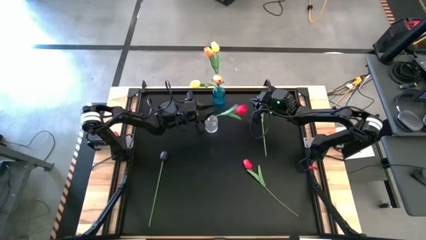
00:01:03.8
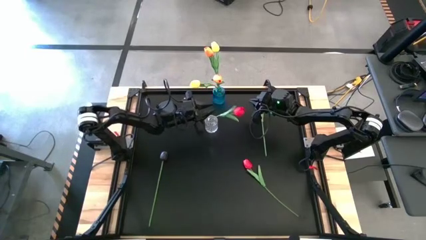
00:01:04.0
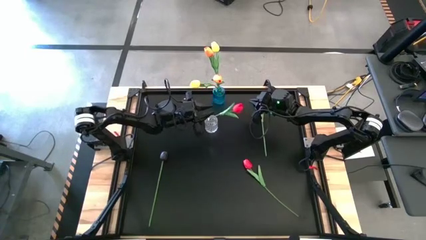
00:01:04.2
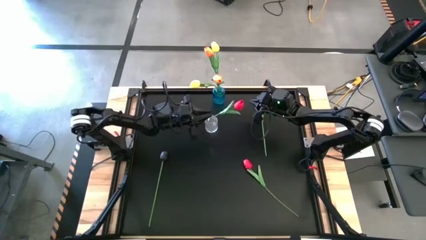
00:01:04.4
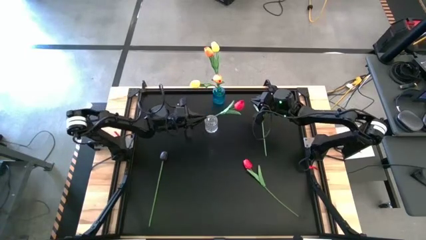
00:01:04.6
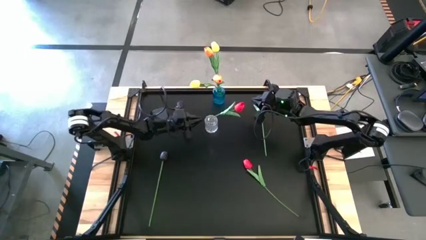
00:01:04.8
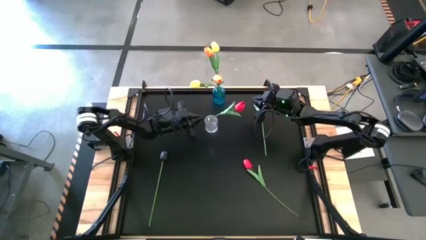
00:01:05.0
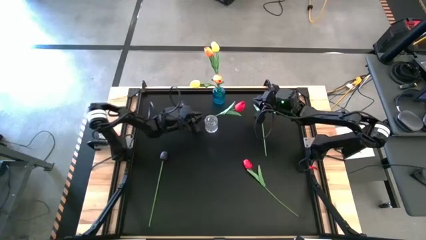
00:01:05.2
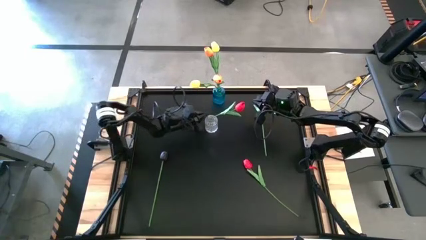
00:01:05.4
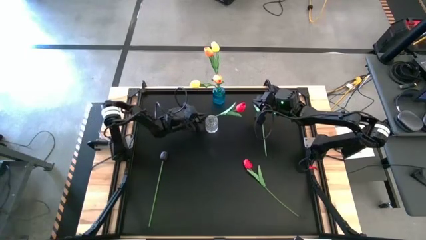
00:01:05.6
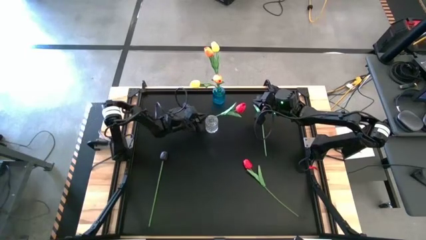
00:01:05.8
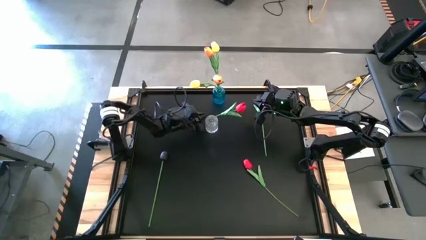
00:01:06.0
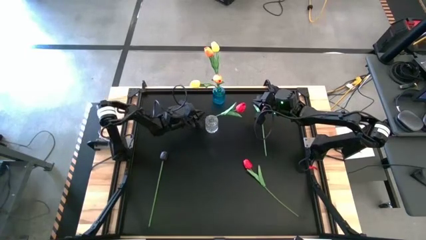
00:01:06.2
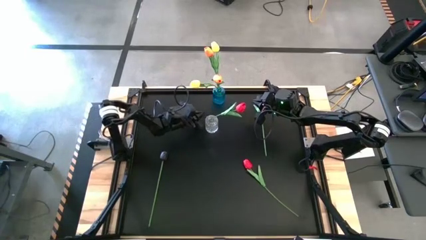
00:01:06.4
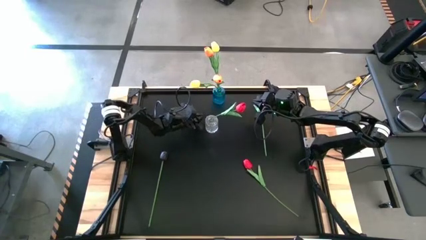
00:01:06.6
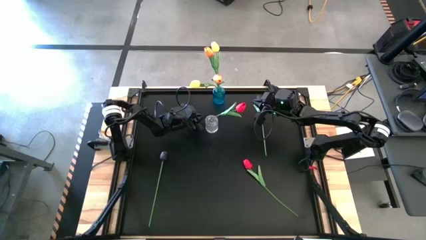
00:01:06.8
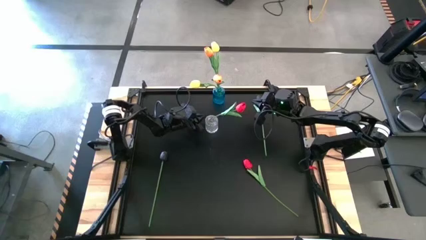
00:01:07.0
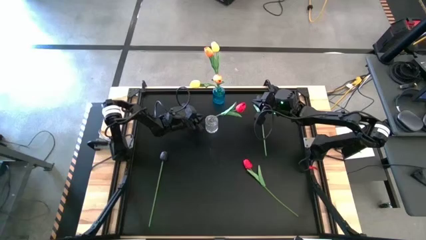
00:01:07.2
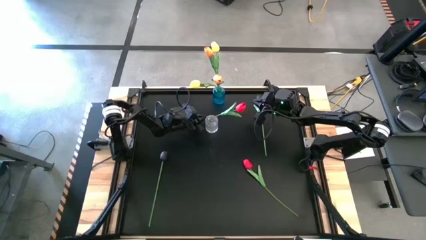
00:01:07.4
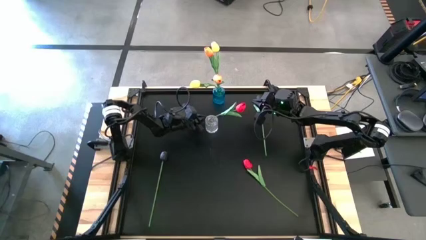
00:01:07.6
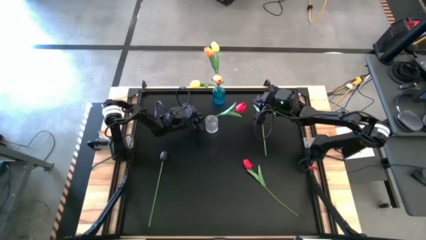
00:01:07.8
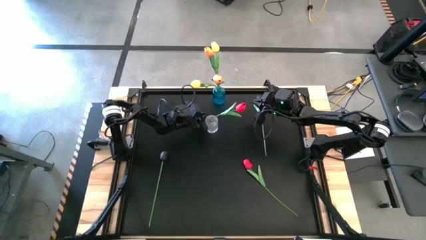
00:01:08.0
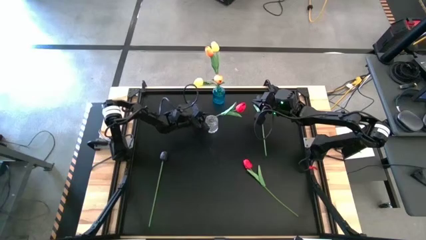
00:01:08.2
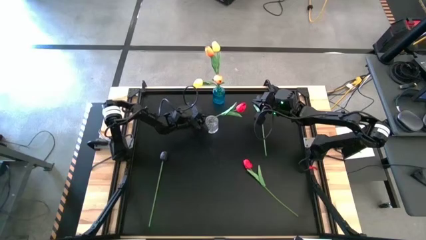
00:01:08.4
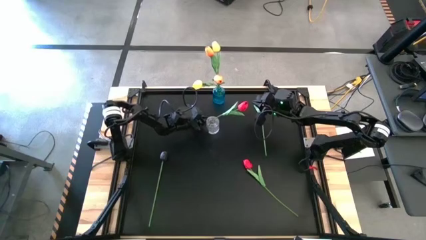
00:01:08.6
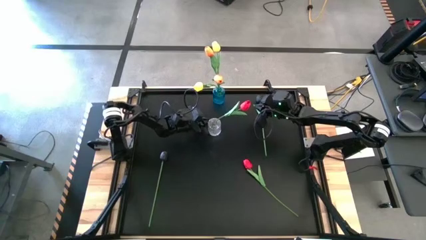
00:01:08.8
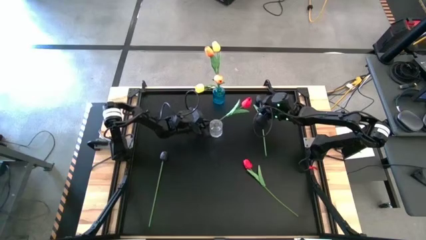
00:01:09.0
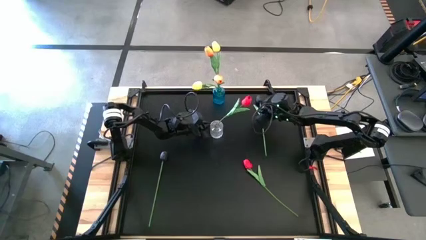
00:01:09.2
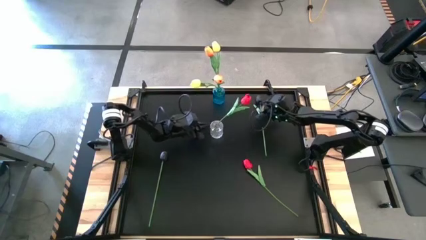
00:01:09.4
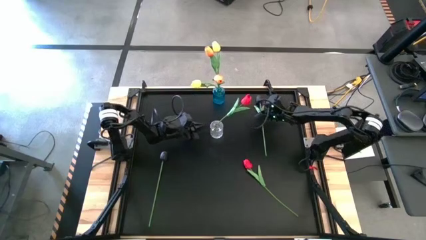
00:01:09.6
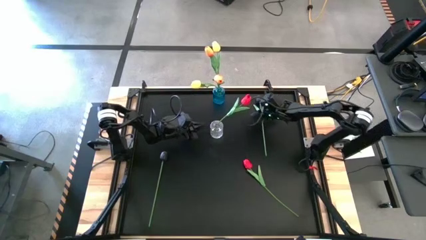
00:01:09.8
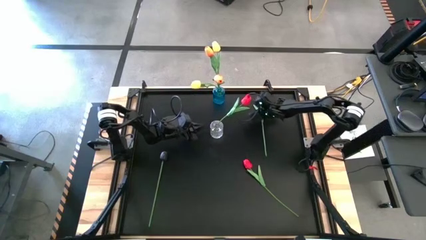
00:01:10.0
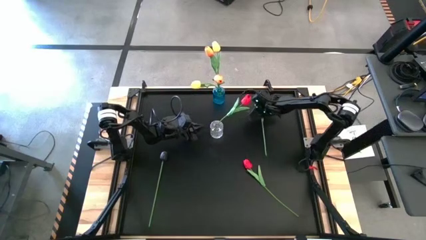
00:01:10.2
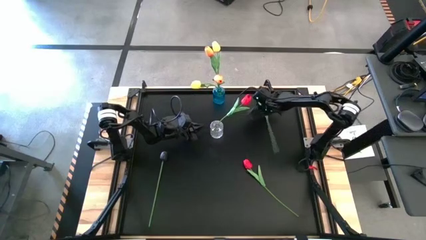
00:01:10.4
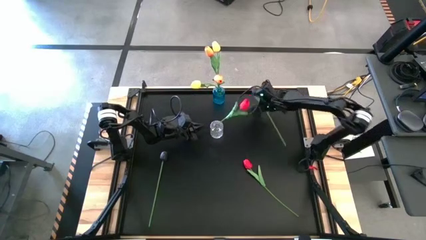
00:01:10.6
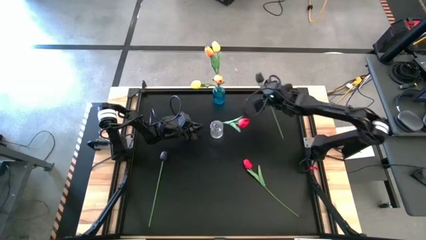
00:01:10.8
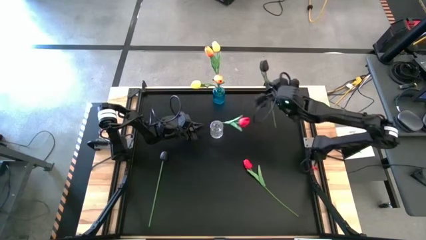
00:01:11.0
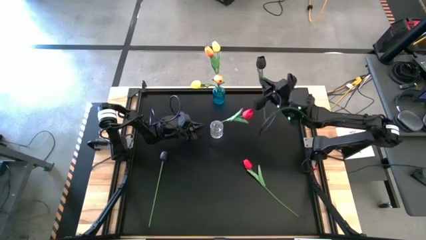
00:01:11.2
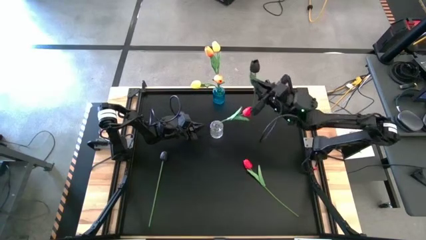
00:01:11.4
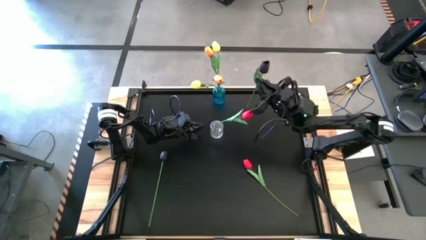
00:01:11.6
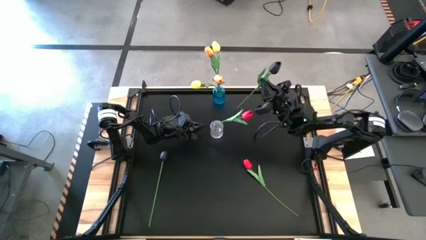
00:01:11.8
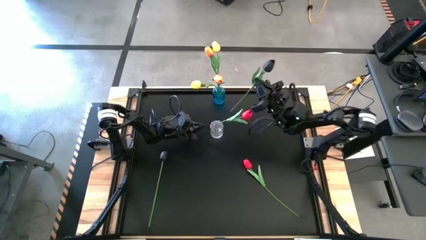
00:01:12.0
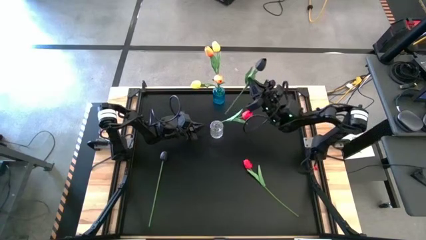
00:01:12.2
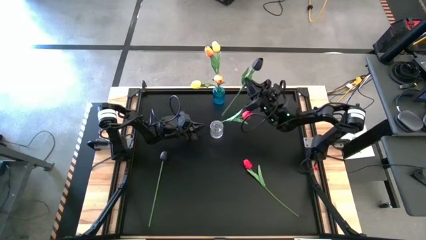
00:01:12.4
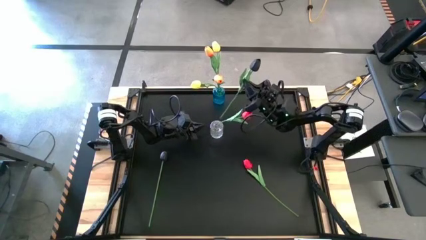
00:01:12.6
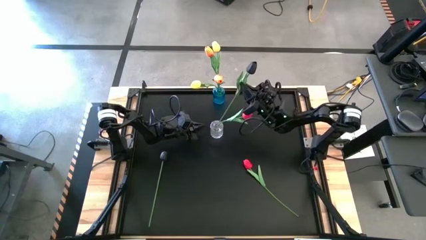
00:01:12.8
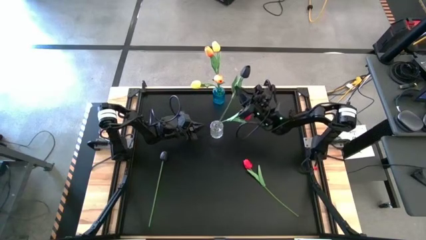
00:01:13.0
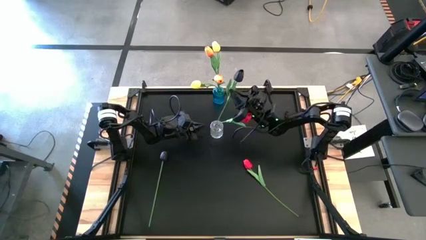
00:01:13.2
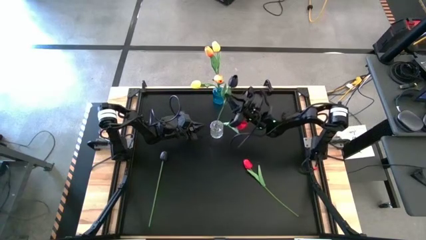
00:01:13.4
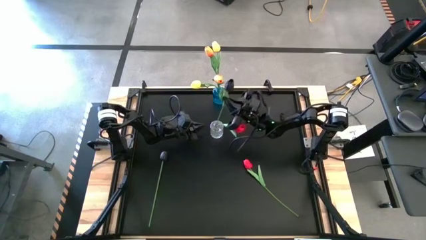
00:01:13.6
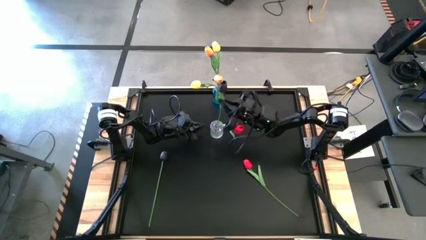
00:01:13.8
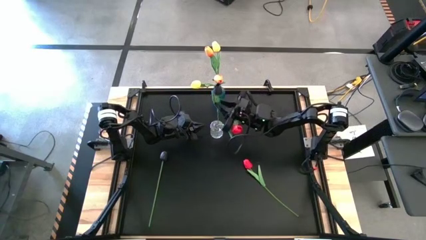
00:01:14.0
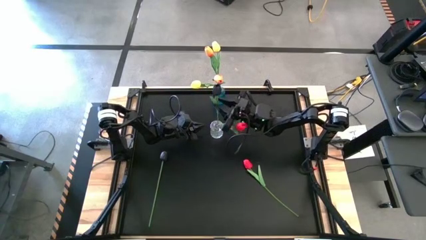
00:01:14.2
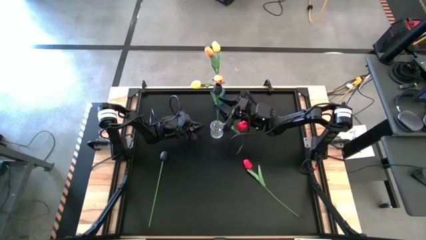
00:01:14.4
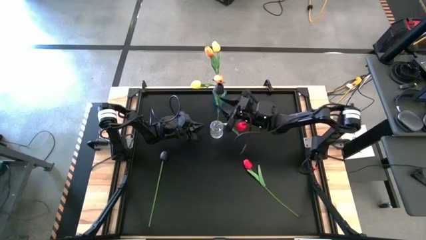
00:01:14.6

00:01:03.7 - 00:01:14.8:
Task: Sort flowers into vase by color
Put the right black tulip into the transparent vase

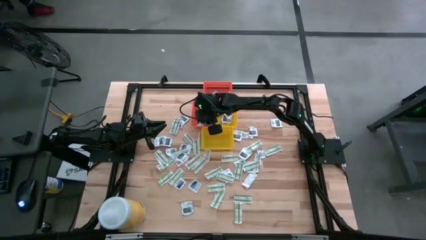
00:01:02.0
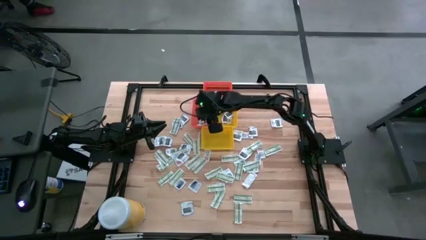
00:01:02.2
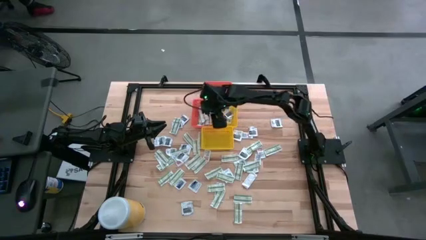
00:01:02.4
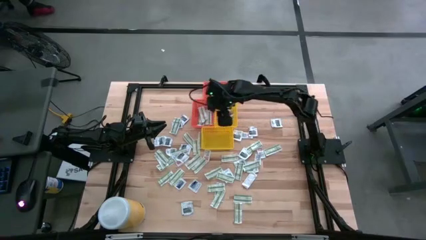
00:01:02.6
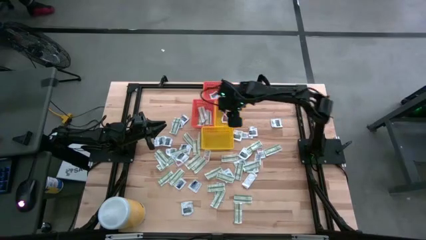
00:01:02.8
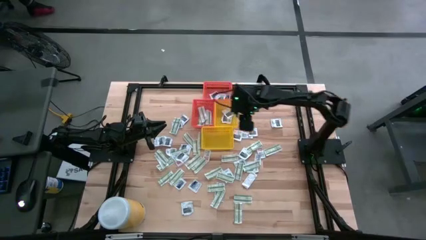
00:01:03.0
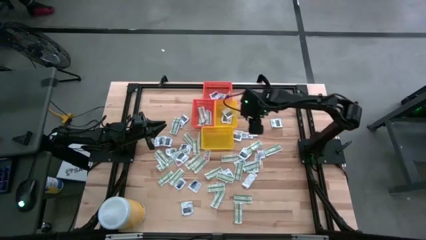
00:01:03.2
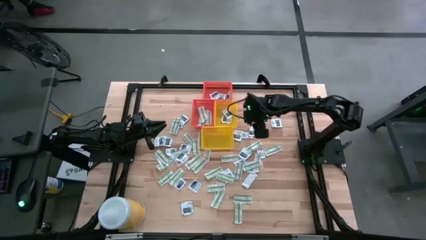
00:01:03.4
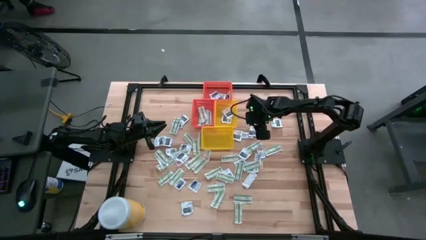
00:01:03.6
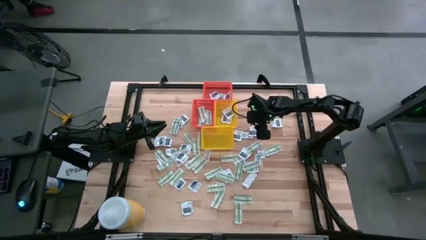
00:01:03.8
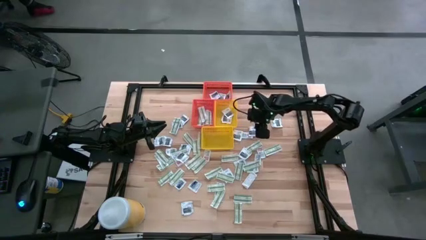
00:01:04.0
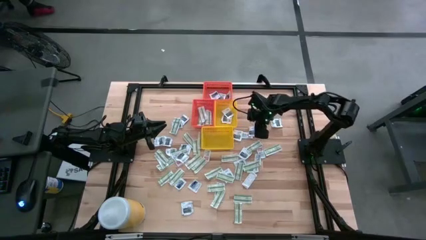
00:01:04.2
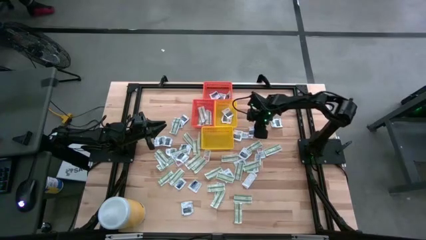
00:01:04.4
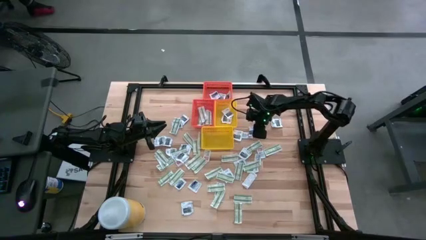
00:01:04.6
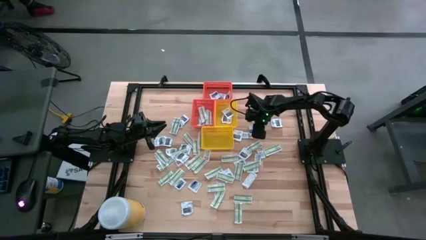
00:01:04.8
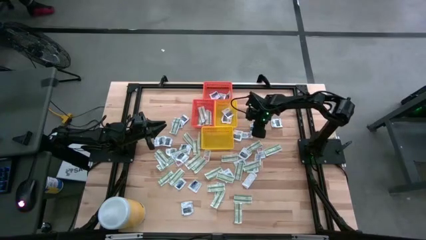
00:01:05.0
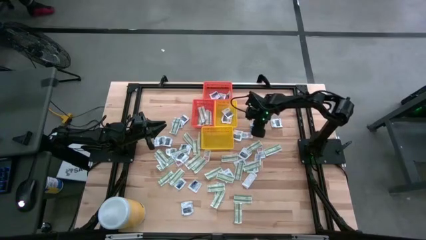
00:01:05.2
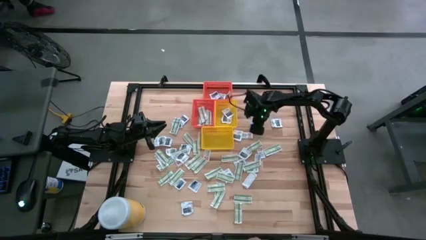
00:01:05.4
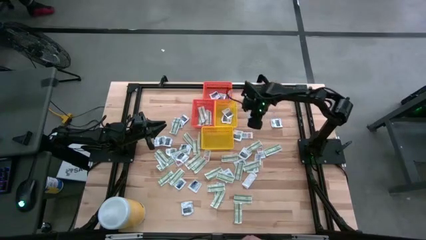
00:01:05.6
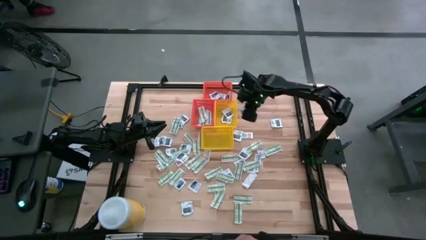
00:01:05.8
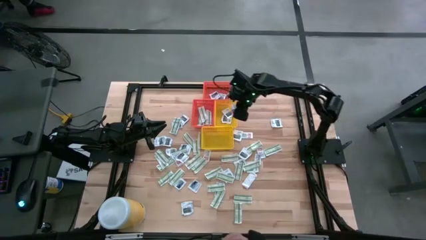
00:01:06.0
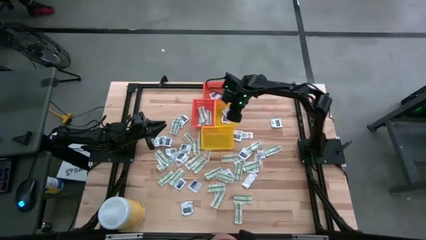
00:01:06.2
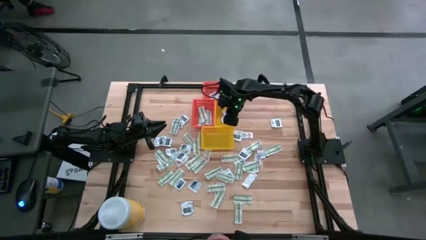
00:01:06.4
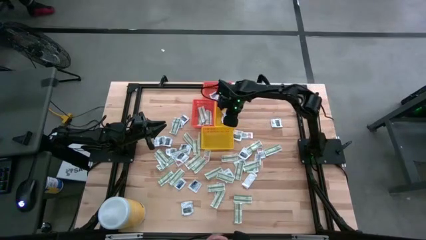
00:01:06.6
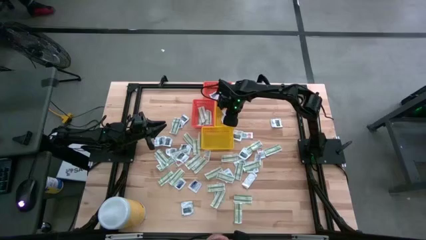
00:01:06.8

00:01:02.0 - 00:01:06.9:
Task: Pick & Place First Aid Supplies
Put the towelette pack into the top yellow bin

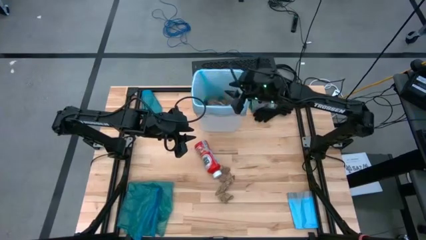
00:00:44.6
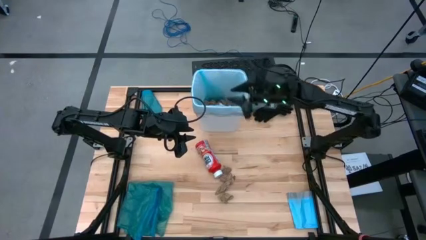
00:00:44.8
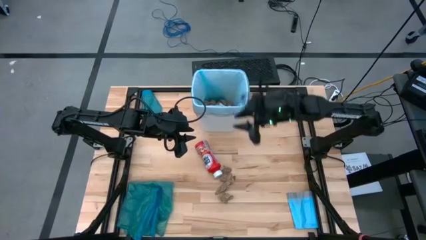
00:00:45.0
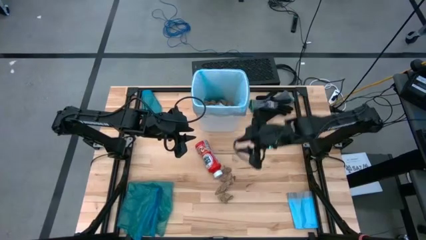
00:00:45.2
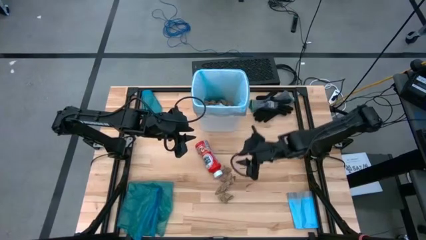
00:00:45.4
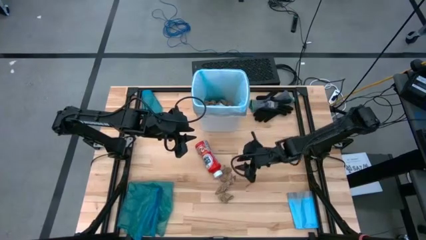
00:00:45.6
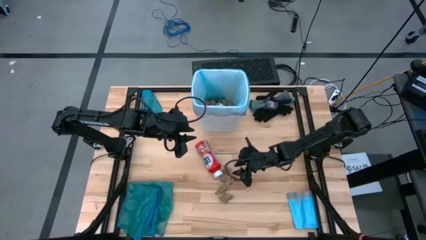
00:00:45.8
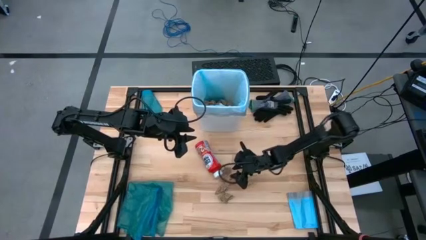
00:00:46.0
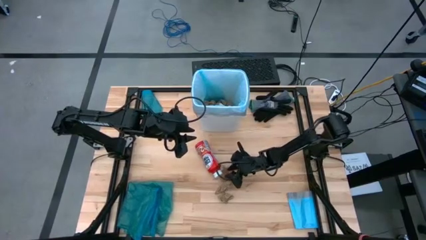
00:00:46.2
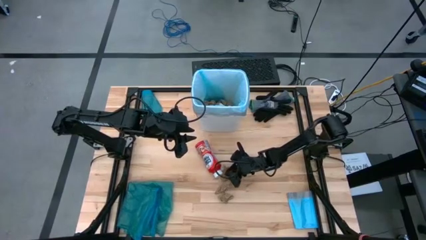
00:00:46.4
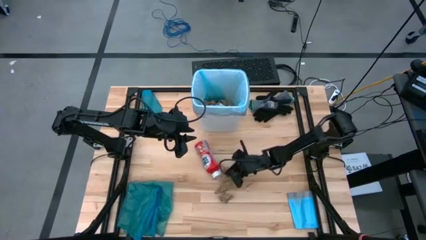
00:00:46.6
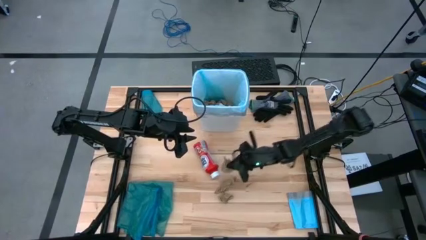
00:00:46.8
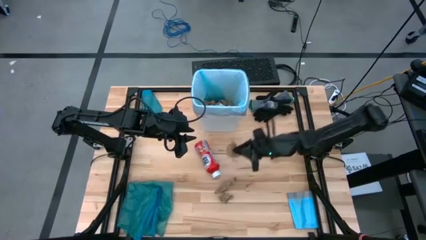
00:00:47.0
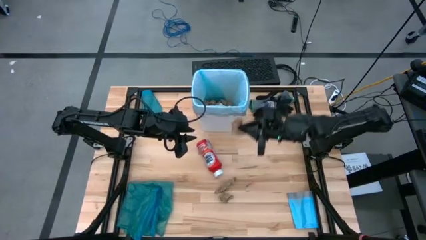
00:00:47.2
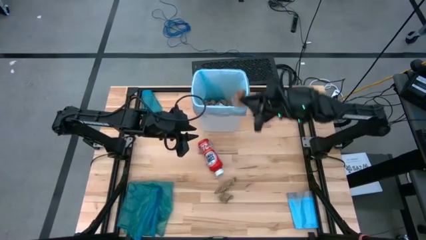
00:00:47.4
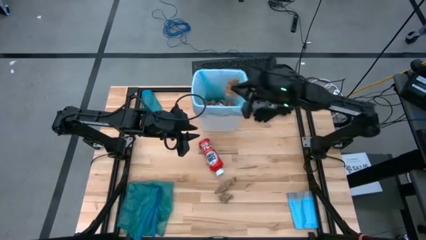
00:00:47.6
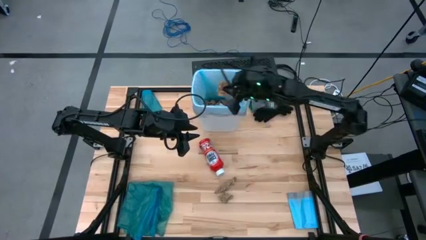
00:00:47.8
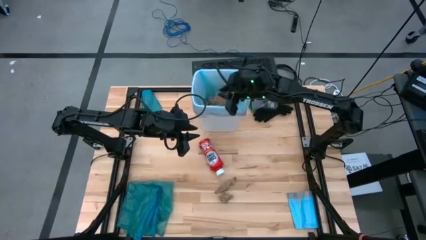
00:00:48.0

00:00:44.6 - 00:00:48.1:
Task: place trash/remove bag and relplace
Put the brown paper into the white trash bin
